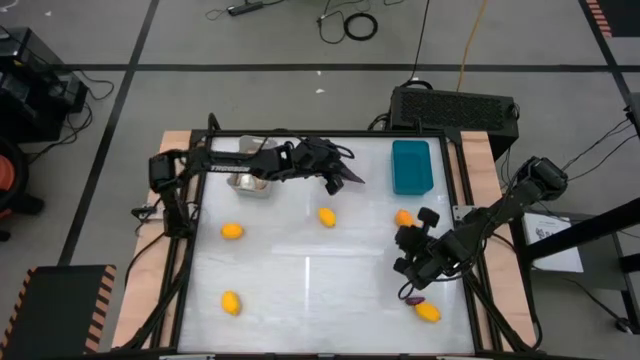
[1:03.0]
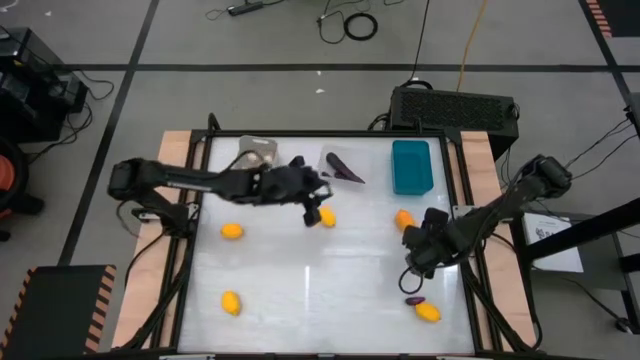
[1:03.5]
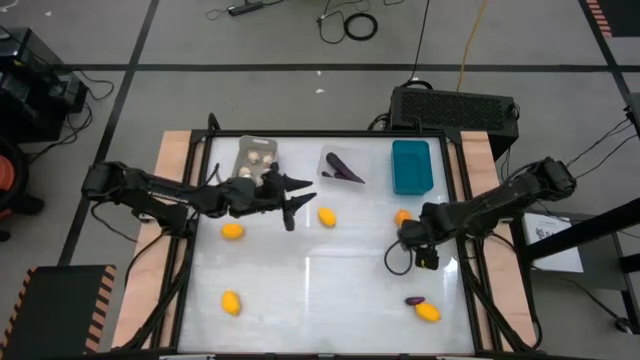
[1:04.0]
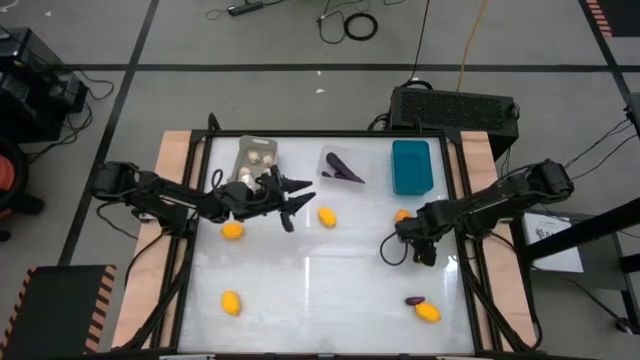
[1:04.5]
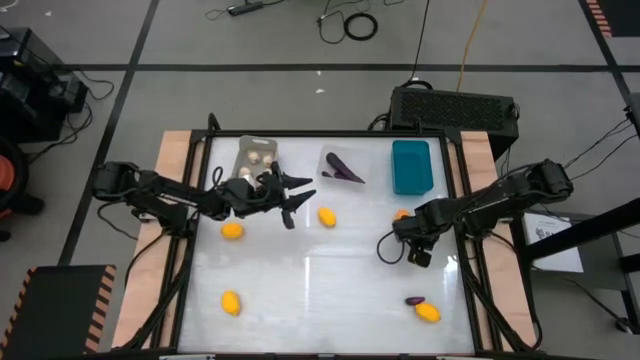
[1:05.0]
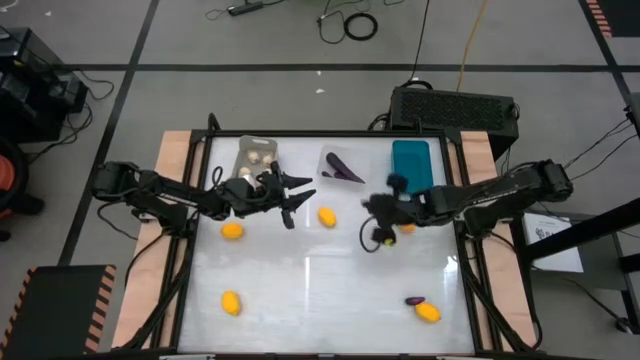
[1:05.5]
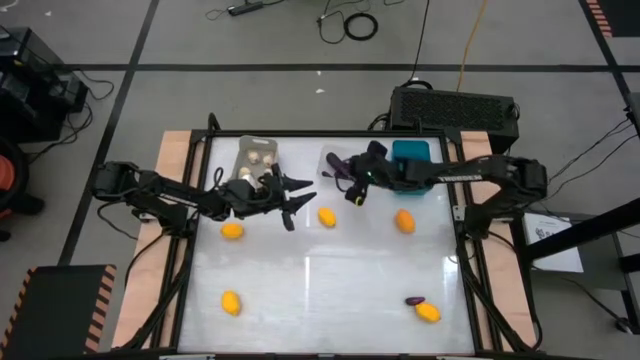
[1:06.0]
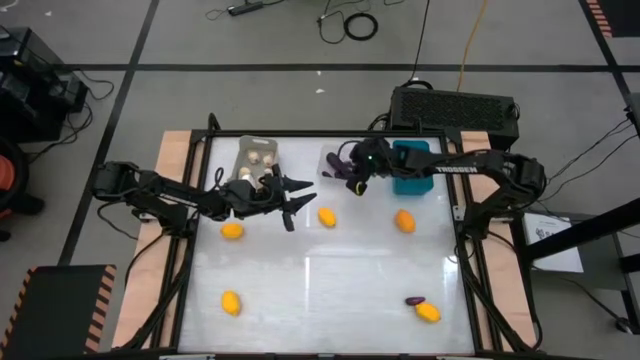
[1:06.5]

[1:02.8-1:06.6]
Task: Sort produce into baskets
Put the eggplant into the transparent bin

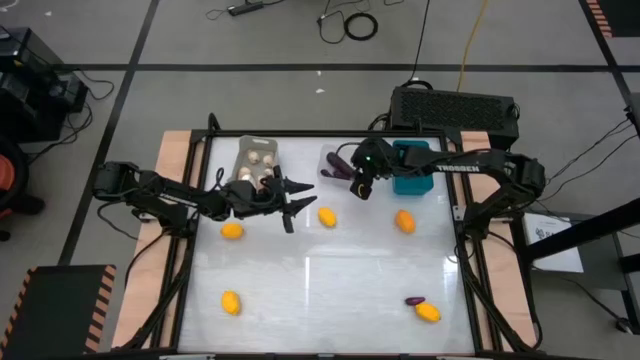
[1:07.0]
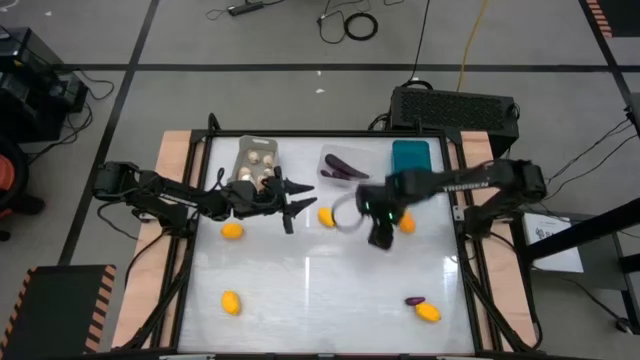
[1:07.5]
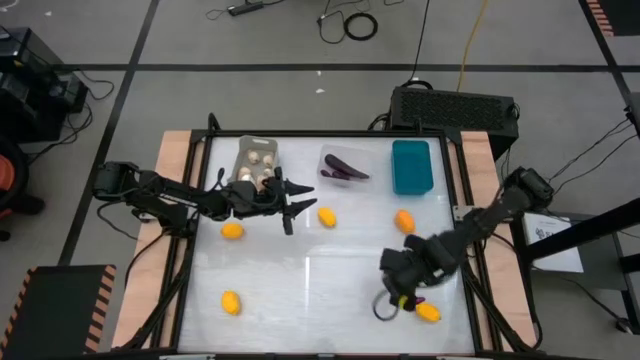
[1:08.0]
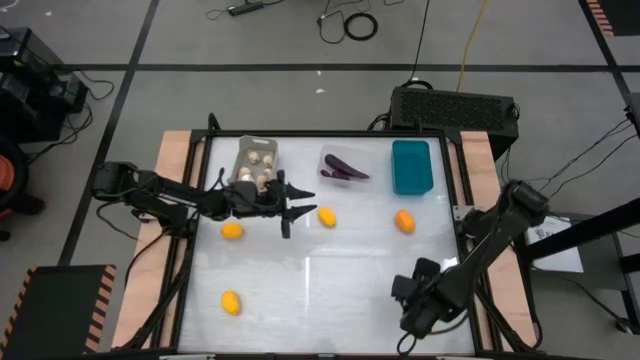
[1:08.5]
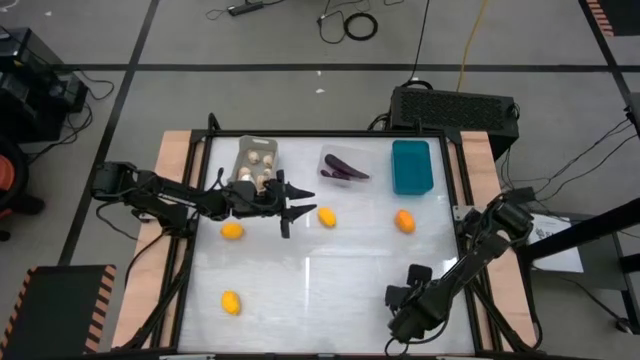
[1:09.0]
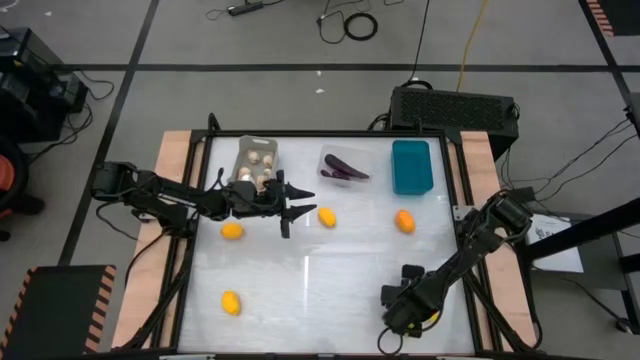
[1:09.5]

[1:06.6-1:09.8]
Put the eggplant into the transparent bin

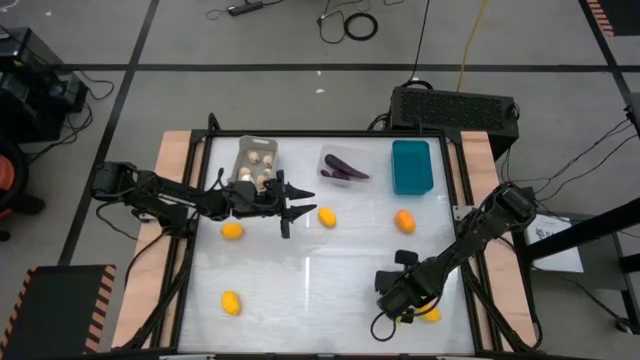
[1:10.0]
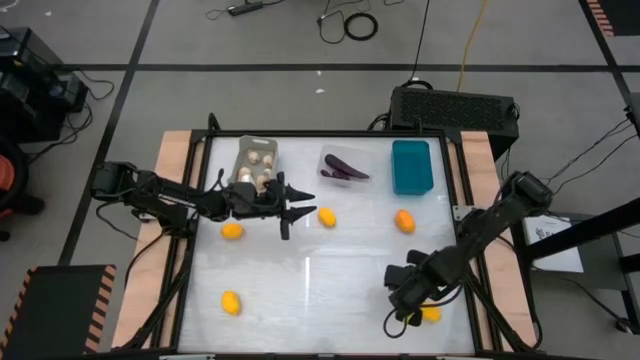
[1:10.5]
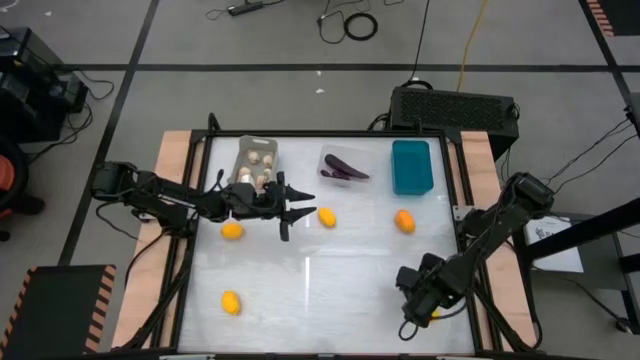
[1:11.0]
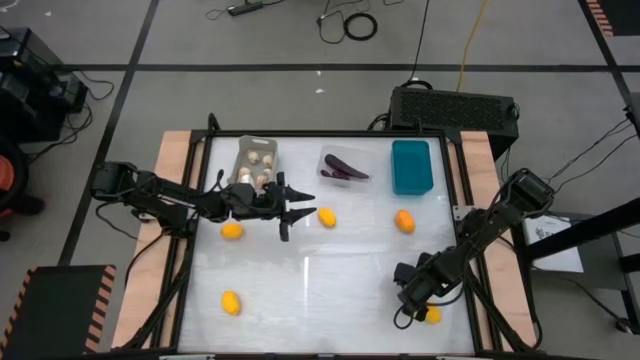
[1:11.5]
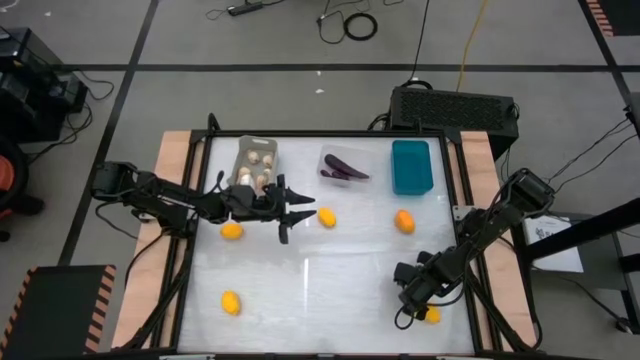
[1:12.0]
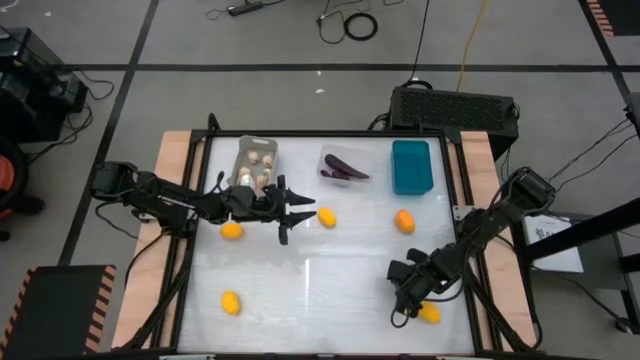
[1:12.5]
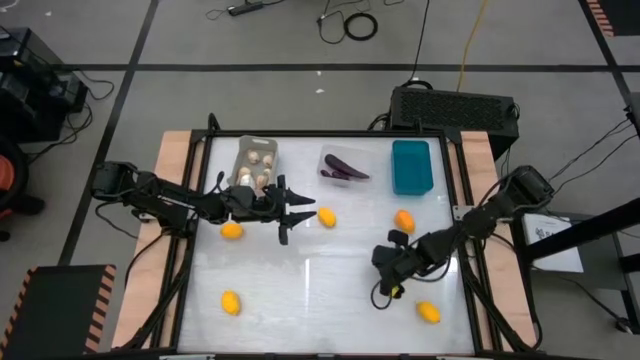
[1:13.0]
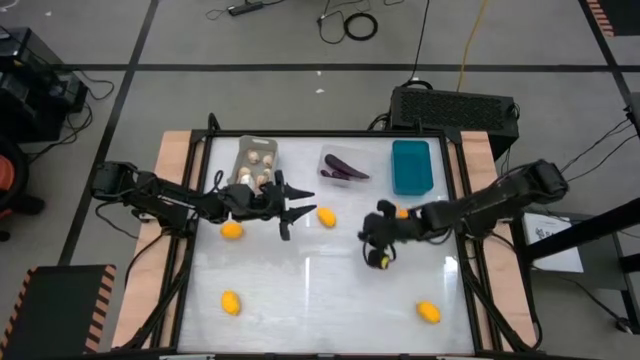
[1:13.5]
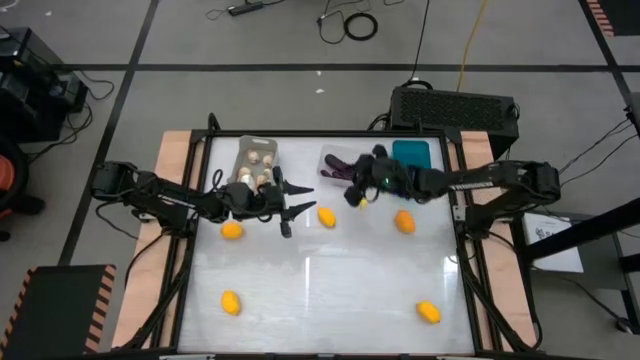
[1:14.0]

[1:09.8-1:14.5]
Put the eggplant into the transparent bin

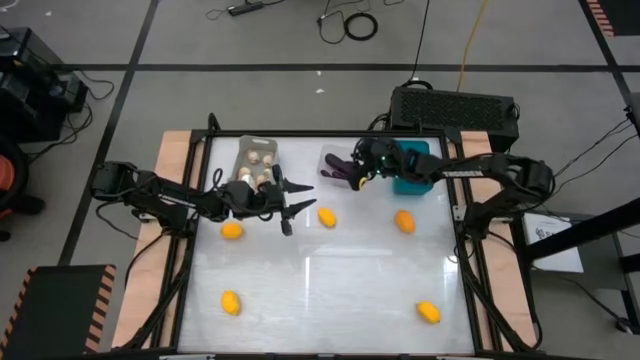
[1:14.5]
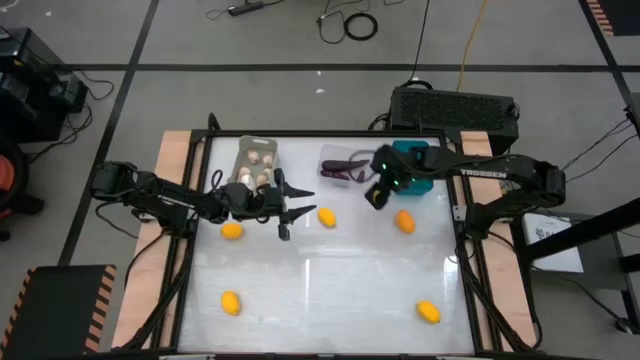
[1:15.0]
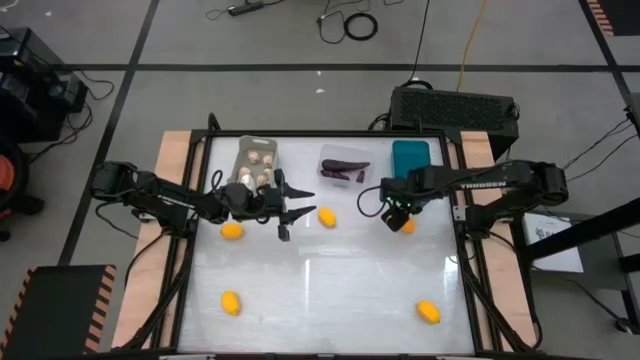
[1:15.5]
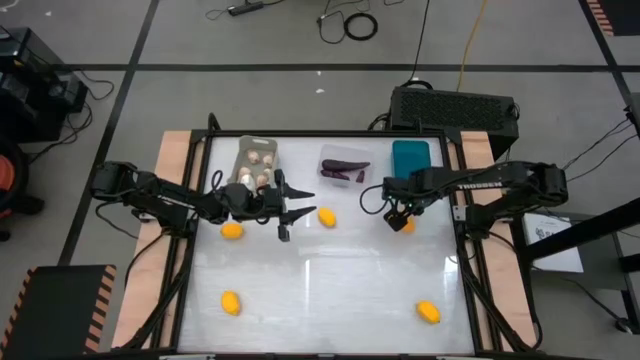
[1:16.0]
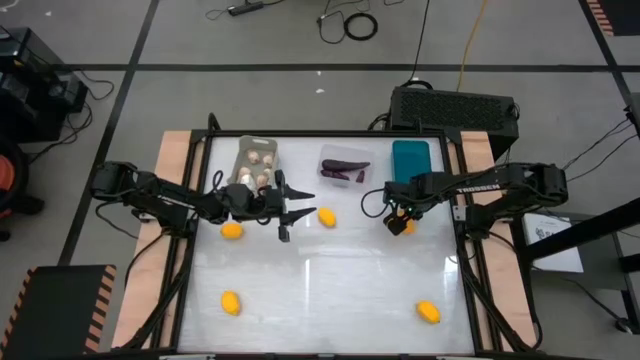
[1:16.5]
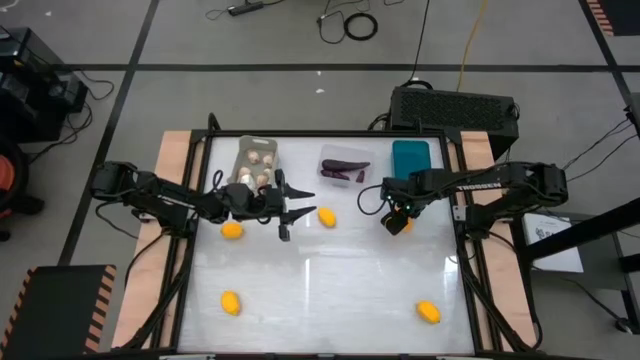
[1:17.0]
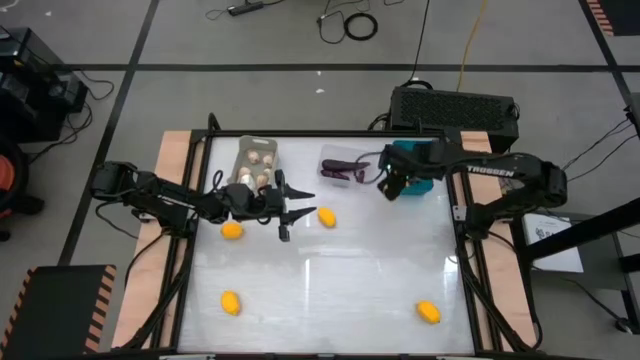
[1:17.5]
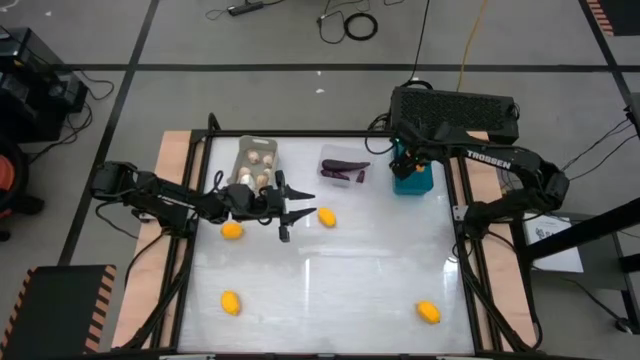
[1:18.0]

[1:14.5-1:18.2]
Put the lemon into the blue bin

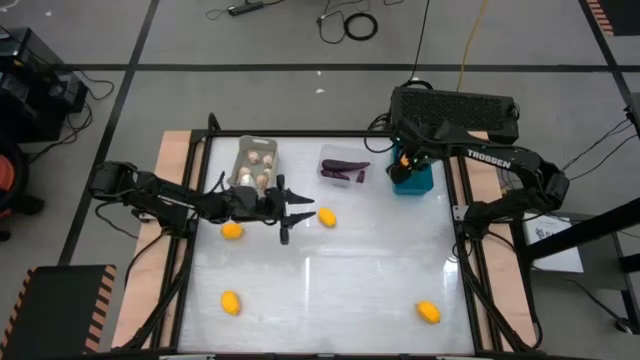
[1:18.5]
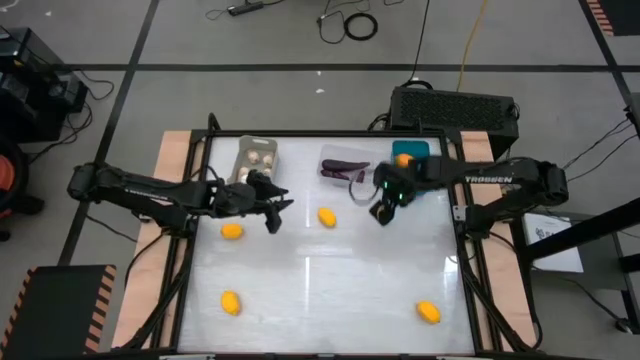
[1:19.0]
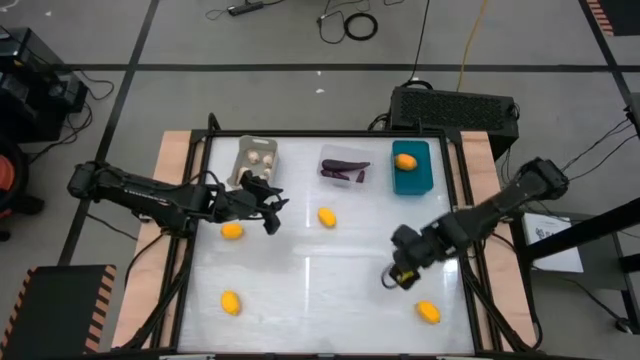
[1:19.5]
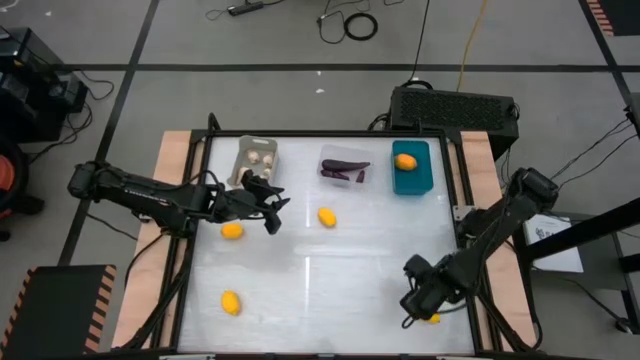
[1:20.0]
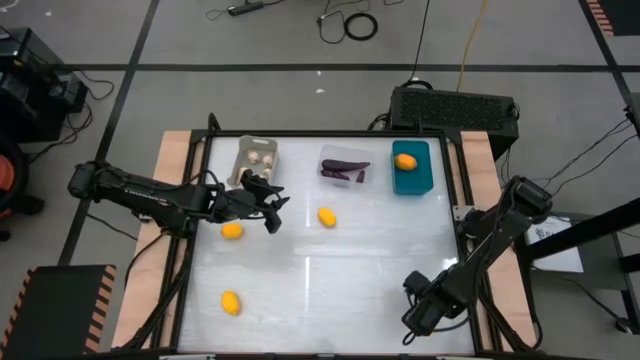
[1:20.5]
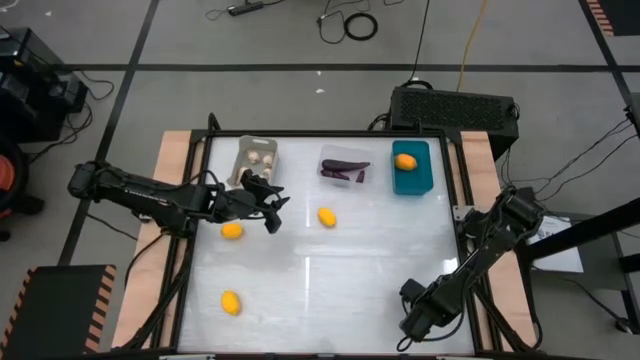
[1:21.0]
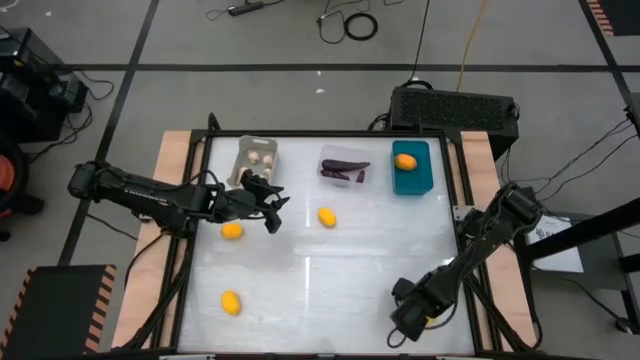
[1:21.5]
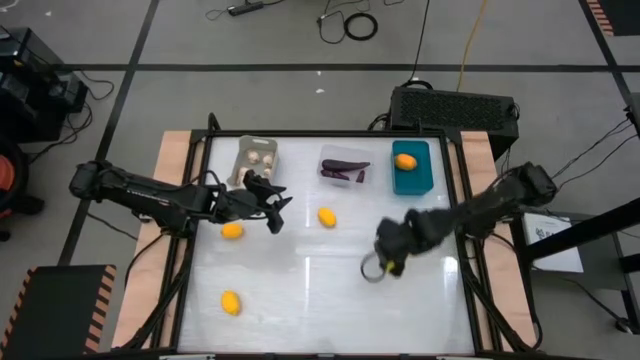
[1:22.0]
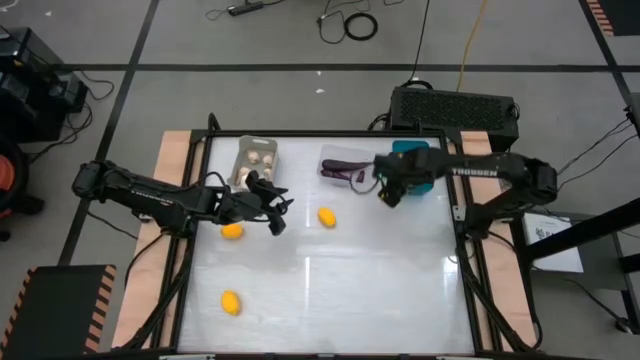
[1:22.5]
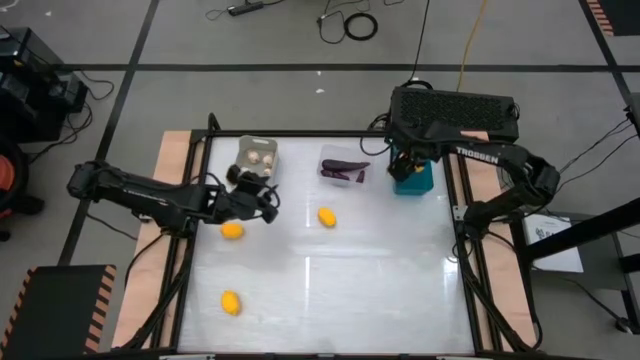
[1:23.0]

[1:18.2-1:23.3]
Put the lemon into the blue bin
